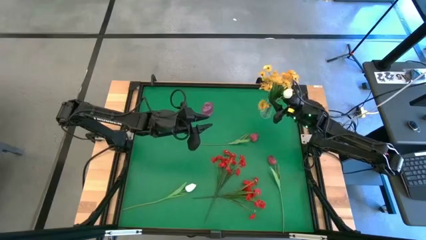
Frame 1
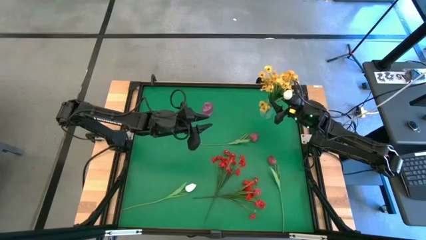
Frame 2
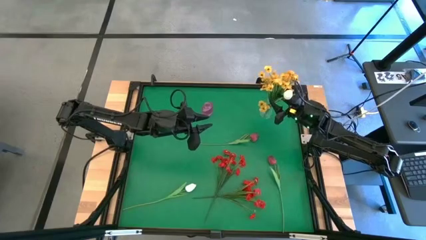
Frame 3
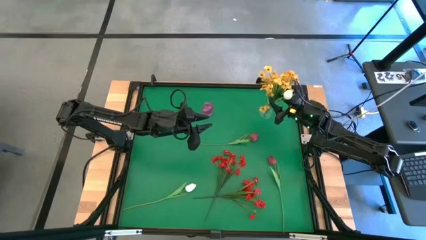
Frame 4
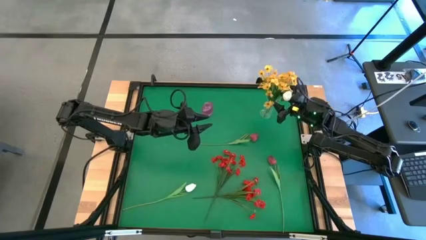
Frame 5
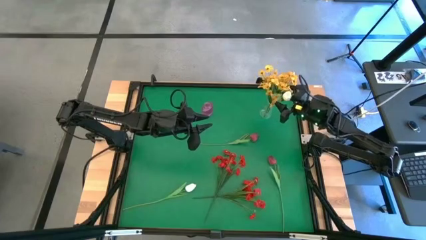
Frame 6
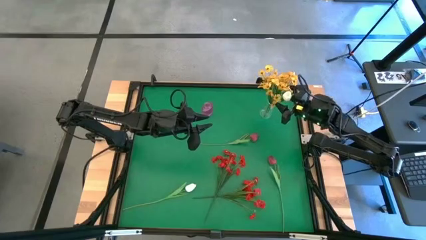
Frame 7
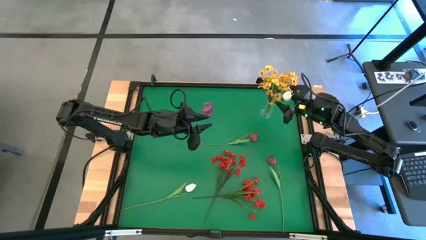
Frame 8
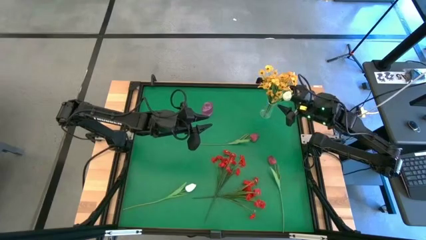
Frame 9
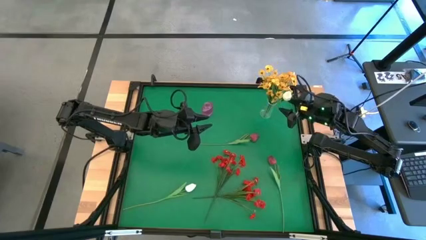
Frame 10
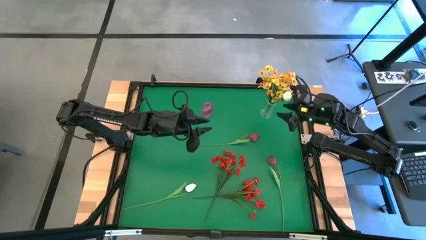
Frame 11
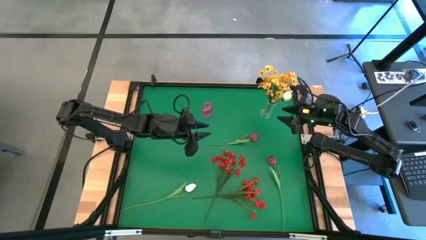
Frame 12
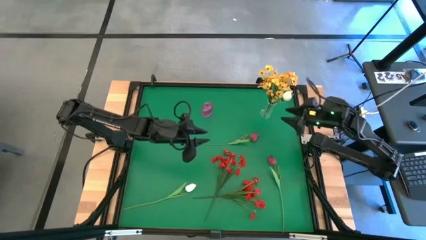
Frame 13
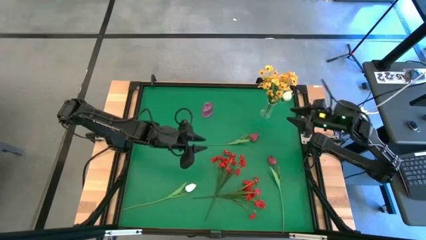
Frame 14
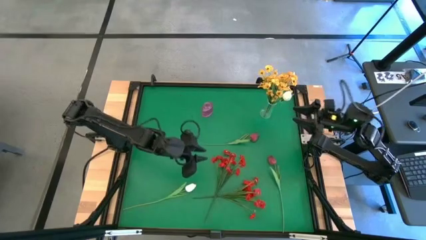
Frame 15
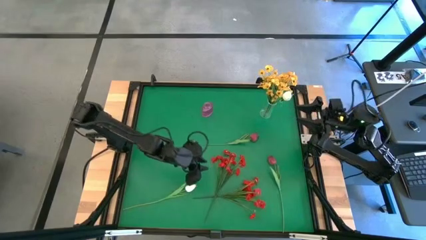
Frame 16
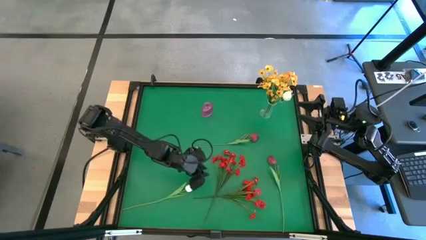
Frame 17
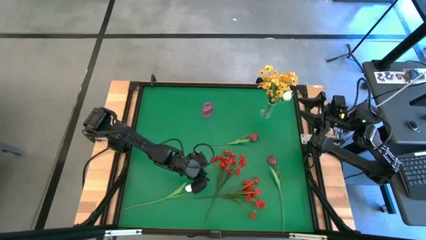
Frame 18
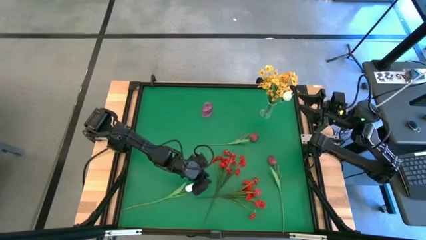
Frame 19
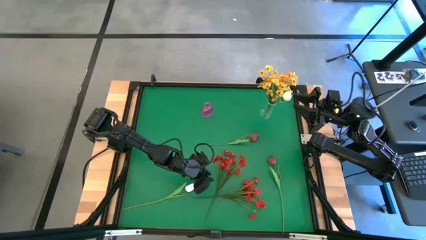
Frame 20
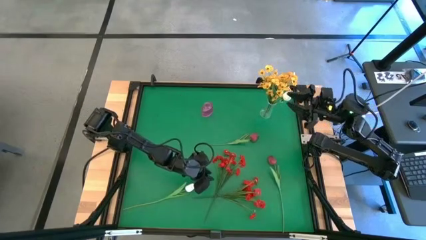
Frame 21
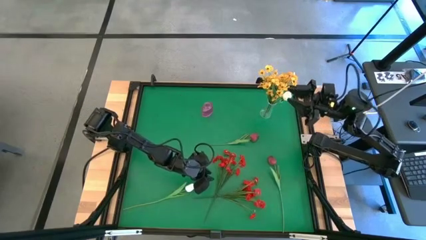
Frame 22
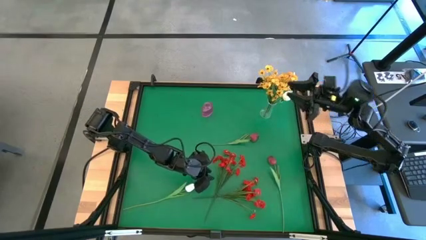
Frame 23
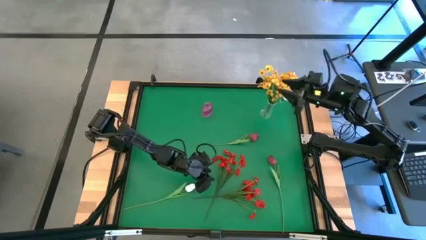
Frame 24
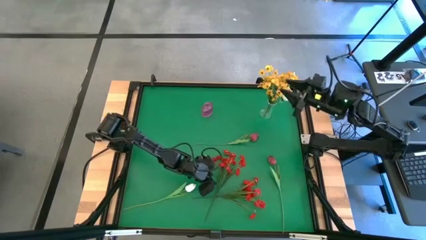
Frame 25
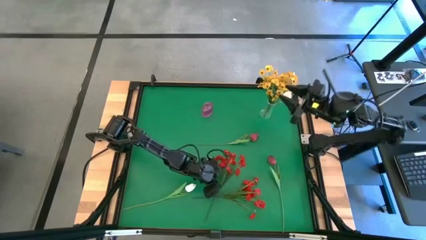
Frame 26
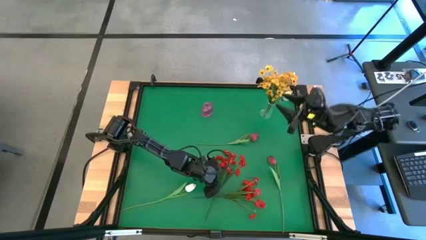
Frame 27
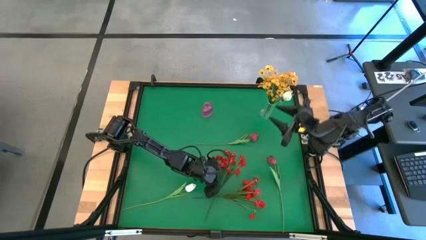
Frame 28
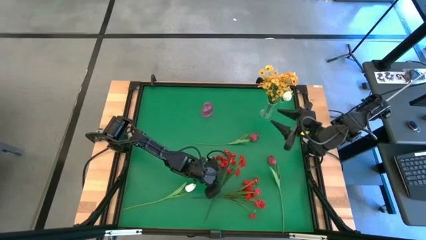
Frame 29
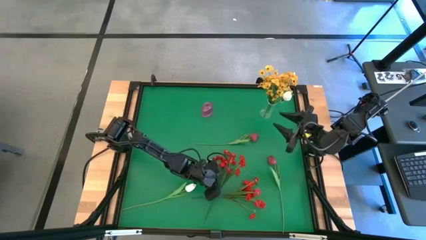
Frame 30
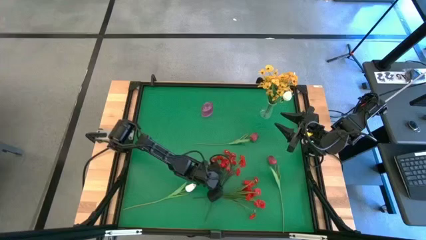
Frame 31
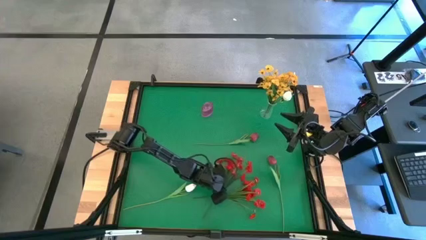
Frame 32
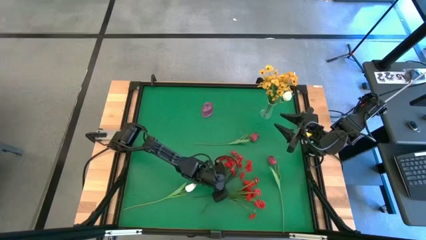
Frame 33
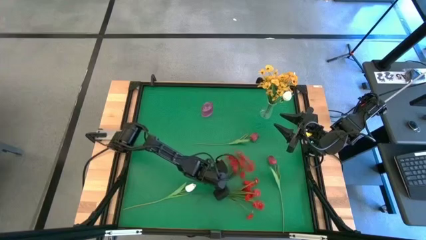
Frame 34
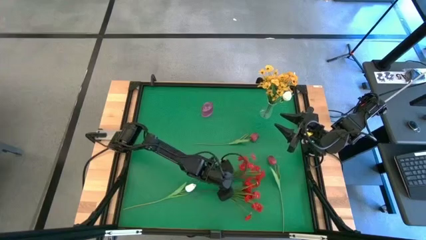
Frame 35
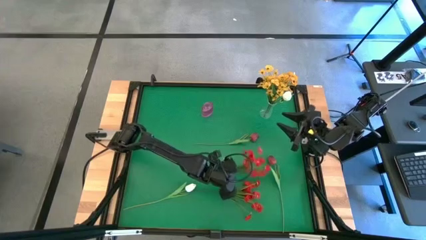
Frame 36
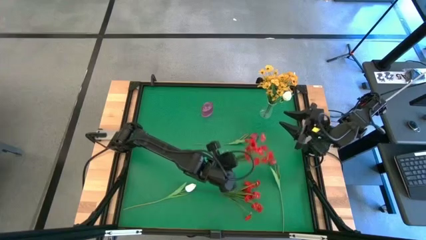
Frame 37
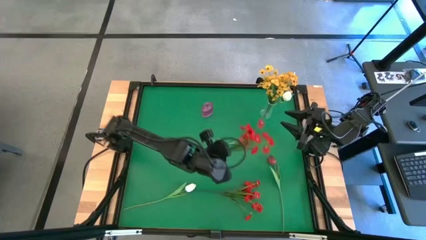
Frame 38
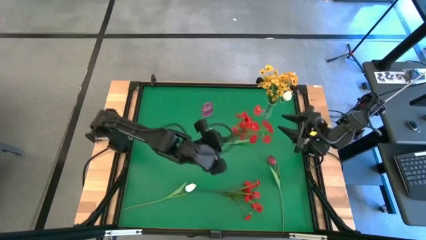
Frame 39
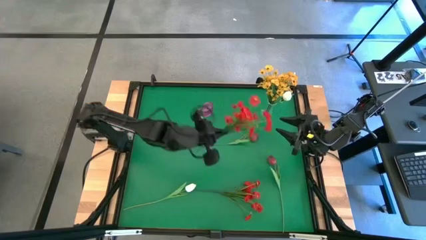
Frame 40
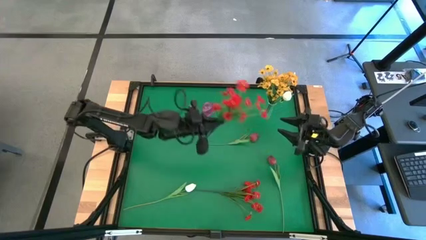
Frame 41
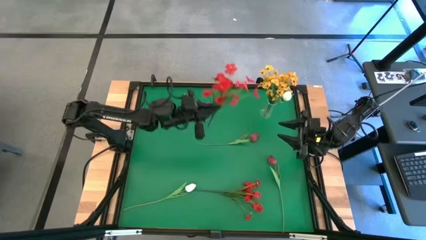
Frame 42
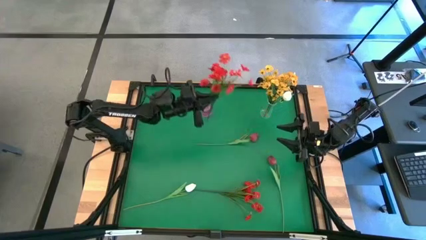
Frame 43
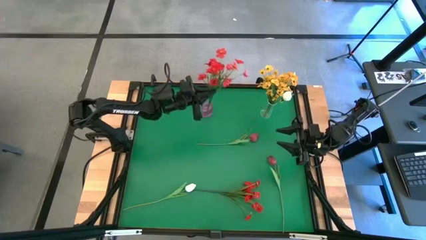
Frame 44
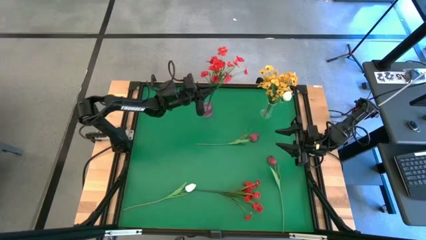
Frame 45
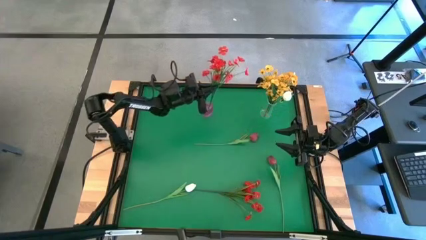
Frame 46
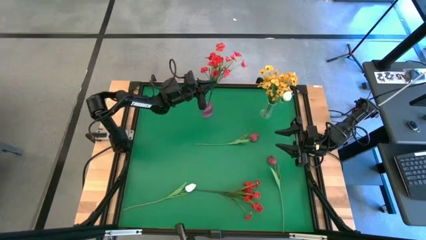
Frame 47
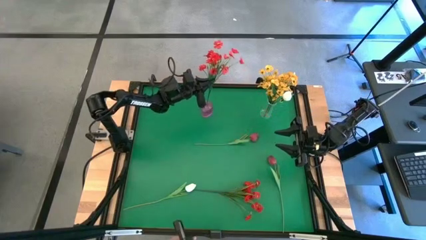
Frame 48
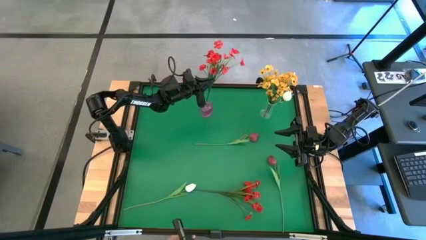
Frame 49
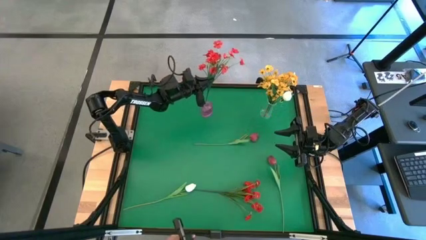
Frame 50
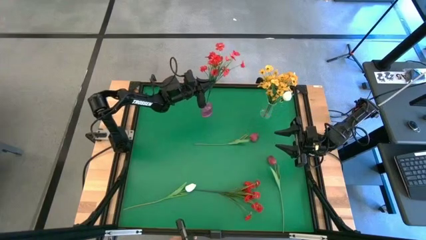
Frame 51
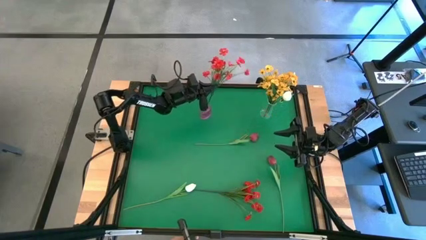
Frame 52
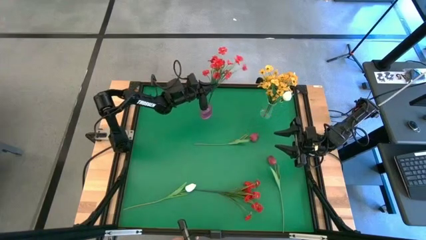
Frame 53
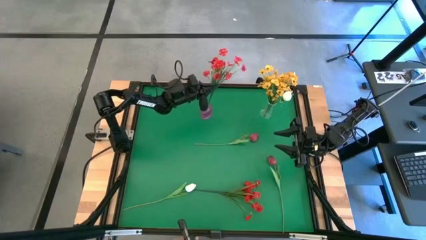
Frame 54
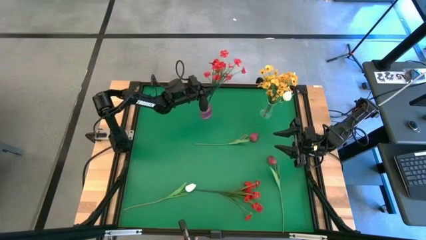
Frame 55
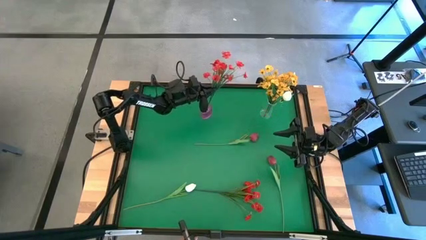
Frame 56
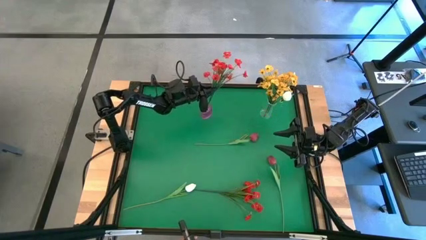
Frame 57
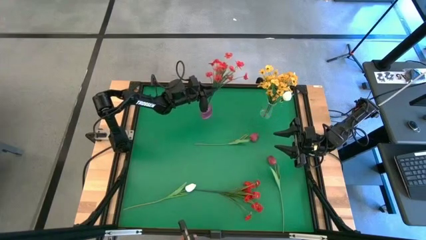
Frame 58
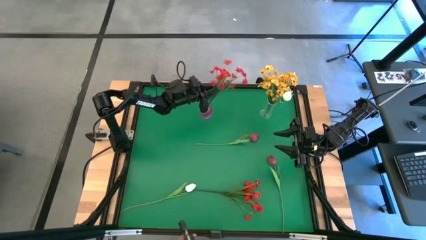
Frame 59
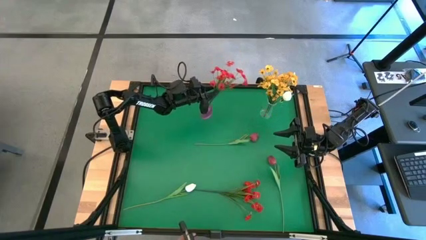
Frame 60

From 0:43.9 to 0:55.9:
Task: Sort flowers into vase by color
Put the top red flowers into the pink vase
